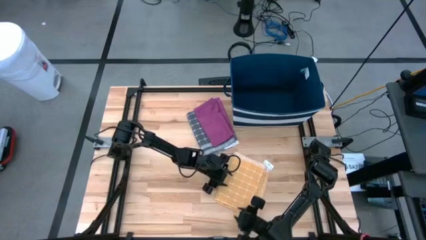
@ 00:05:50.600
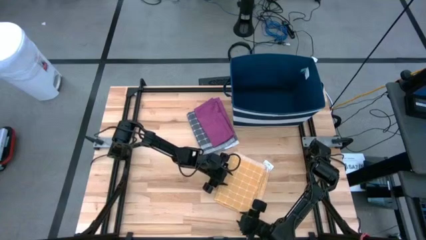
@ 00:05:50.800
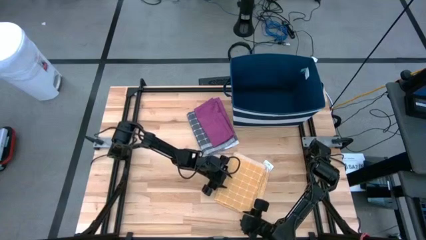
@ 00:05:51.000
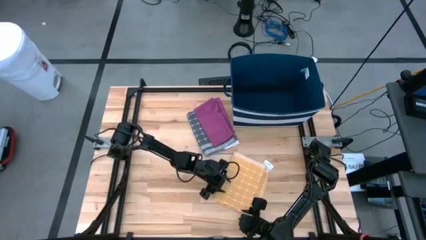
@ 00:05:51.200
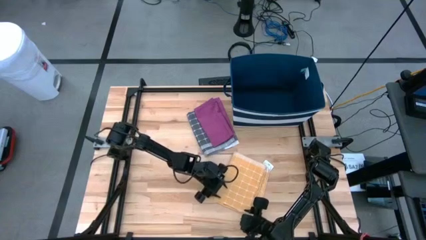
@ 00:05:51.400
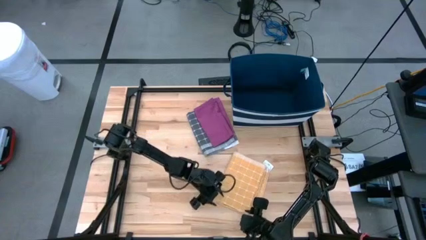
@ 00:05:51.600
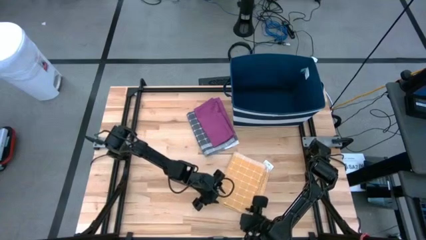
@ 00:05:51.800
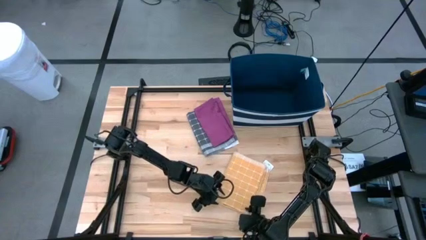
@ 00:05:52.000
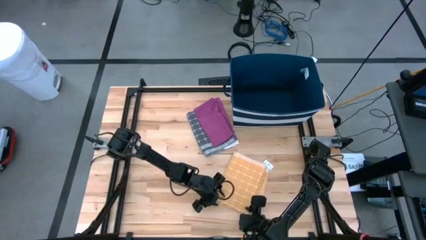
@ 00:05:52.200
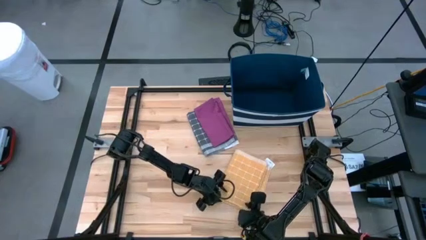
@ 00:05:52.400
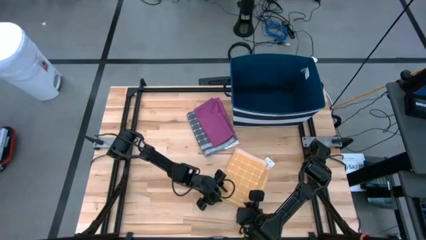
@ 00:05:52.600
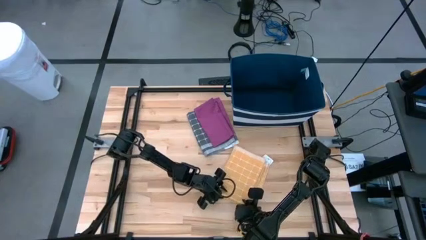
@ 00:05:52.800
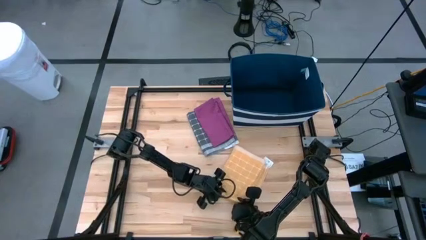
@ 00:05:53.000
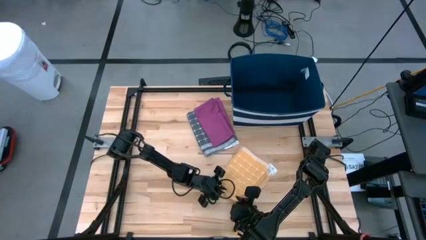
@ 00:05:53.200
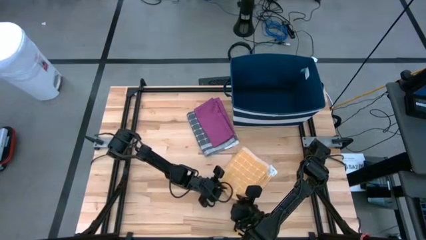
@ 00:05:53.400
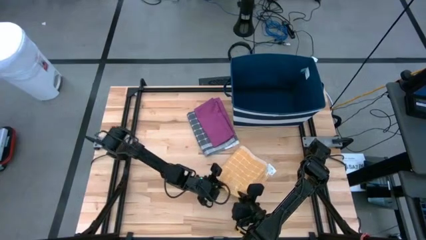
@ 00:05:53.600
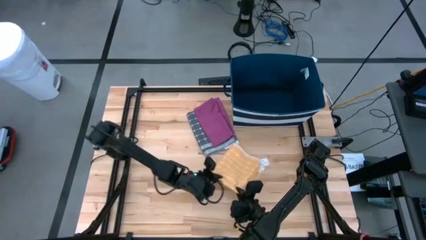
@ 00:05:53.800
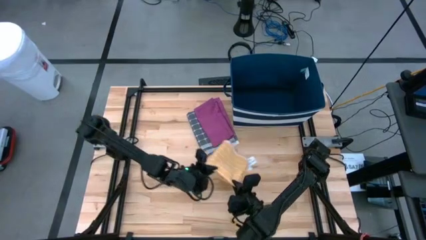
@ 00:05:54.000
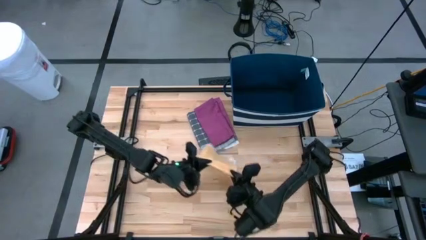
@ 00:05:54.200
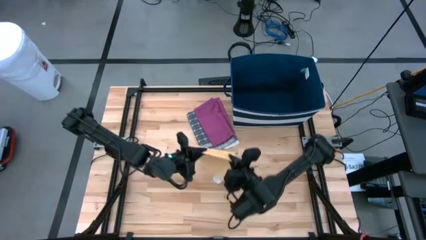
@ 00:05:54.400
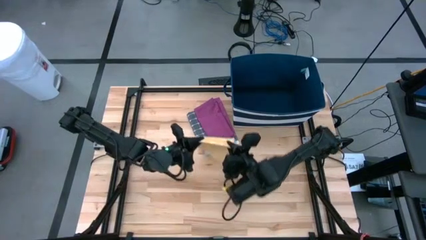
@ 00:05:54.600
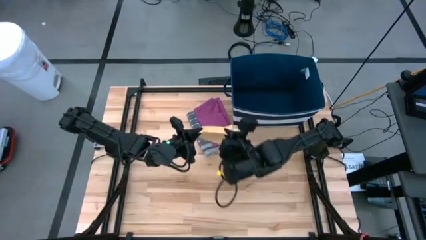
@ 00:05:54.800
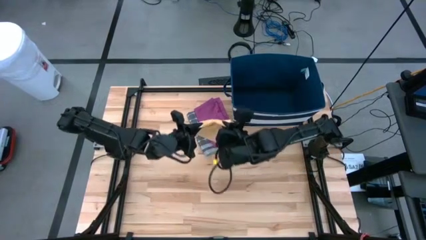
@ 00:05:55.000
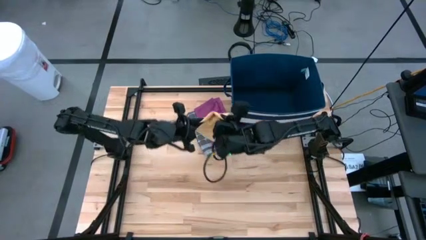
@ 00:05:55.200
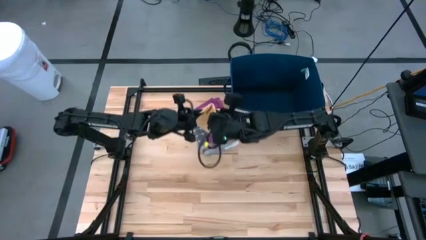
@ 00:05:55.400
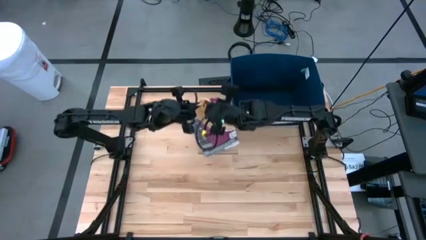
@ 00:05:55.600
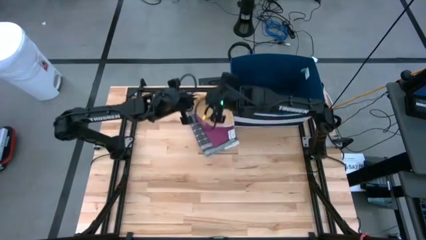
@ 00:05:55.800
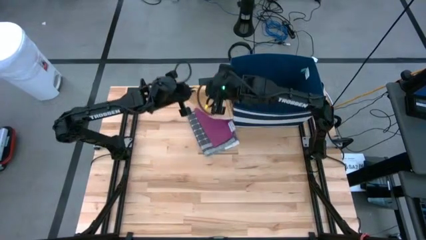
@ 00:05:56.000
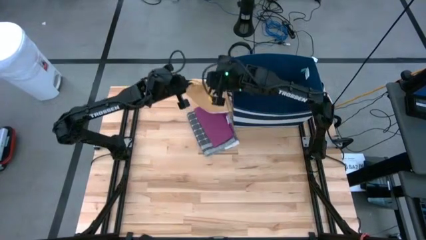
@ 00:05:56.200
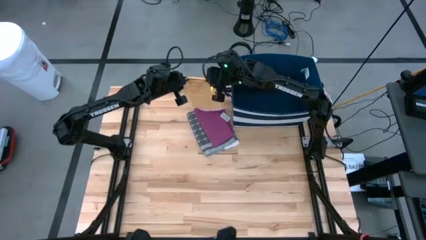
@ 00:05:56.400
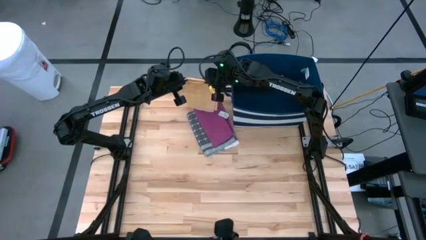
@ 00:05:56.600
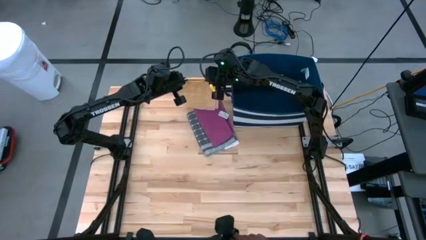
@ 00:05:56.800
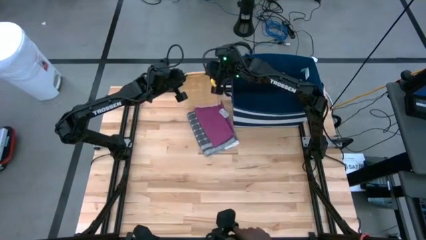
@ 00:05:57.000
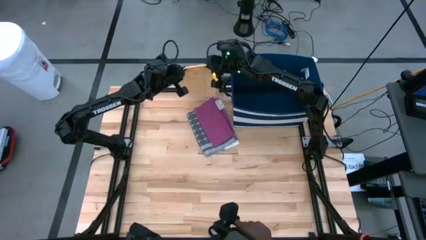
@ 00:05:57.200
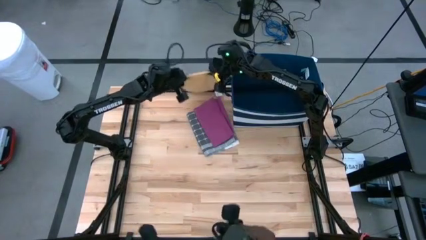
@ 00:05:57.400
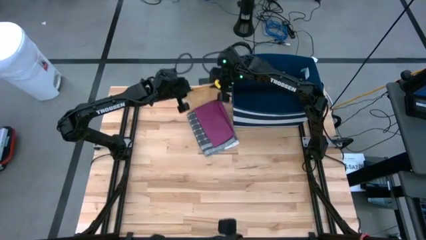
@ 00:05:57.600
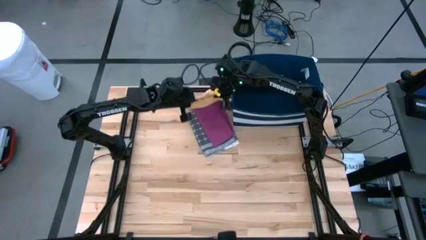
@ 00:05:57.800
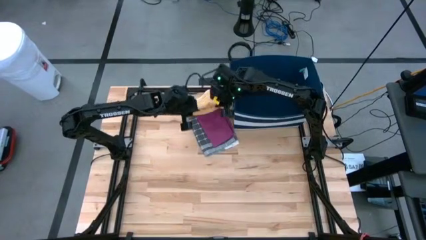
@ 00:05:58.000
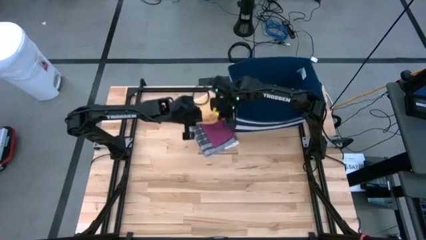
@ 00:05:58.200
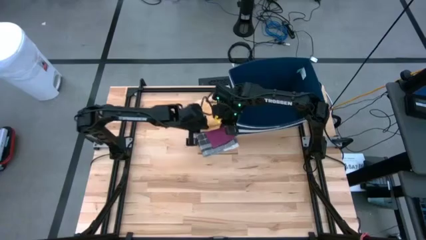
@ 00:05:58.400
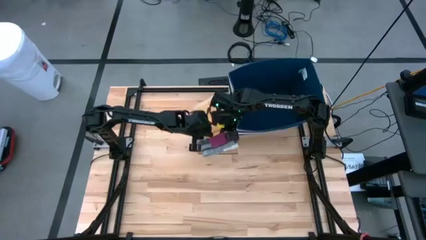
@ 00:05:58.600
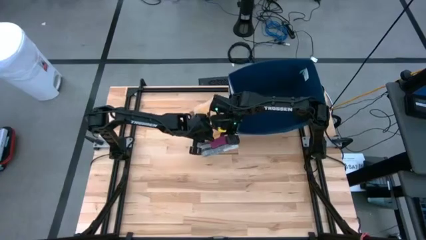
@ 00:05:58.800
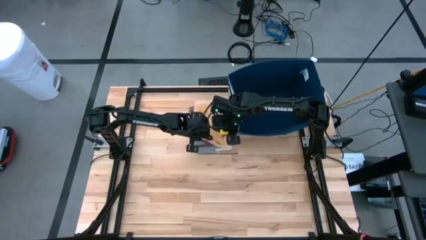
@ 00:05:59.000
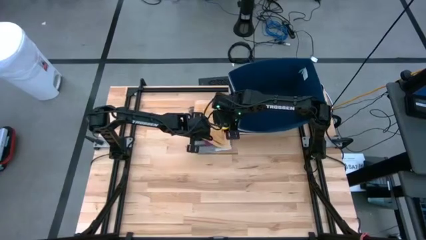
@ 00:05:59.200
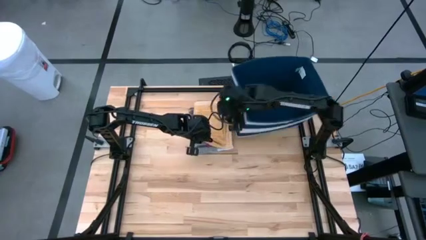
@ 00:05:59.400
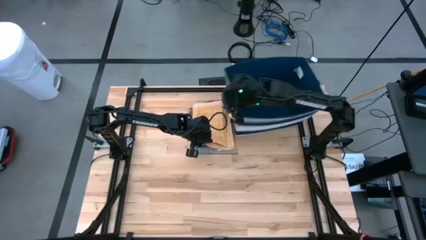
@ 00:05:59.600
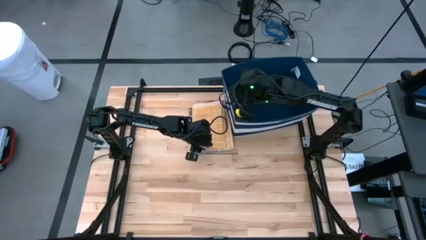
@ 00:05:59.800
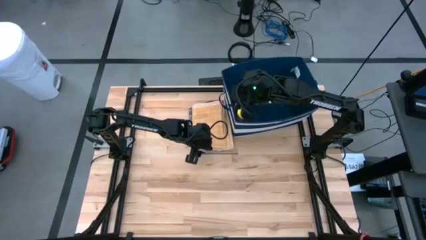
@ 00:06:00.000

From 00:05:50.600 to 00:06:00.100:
Task: Fold towel
Stack the folded orange checkered towel on top of the folded pink towel

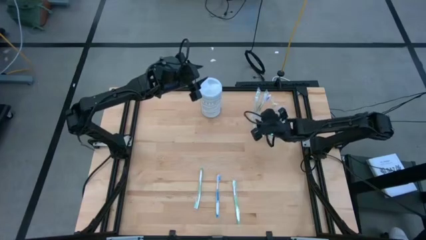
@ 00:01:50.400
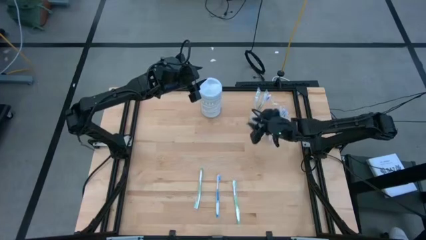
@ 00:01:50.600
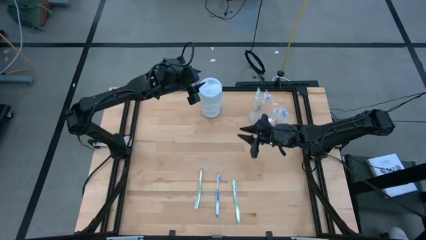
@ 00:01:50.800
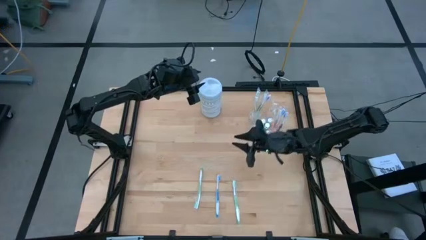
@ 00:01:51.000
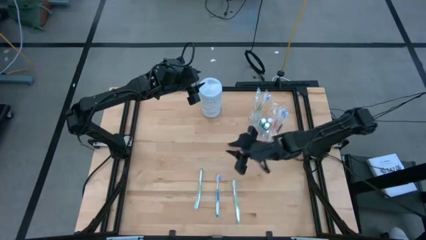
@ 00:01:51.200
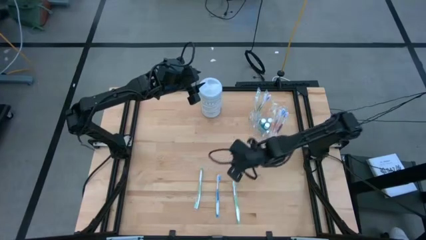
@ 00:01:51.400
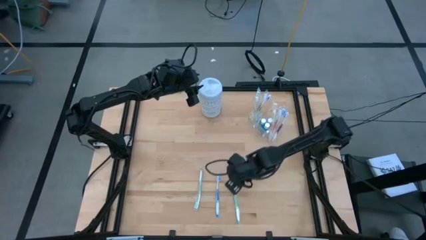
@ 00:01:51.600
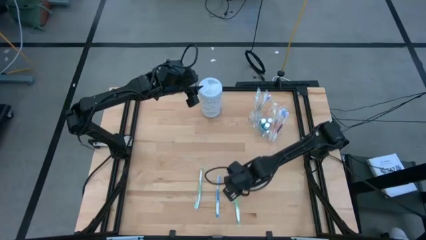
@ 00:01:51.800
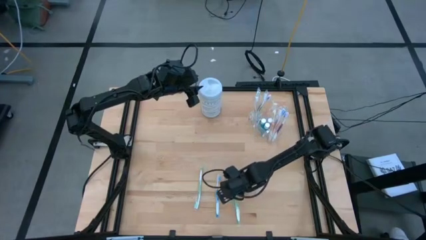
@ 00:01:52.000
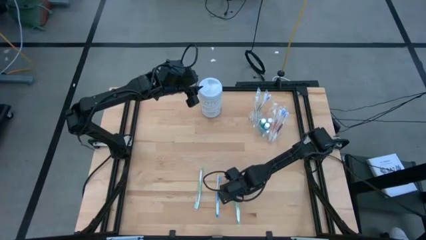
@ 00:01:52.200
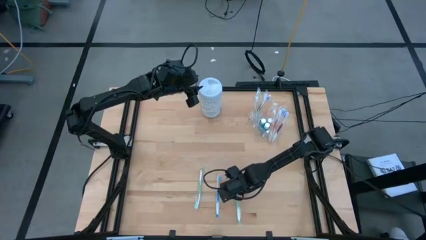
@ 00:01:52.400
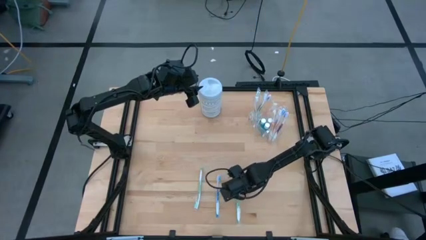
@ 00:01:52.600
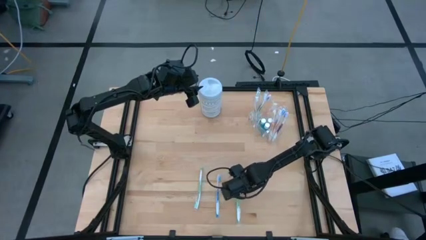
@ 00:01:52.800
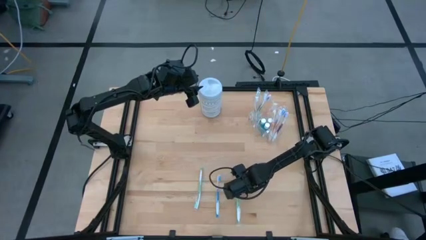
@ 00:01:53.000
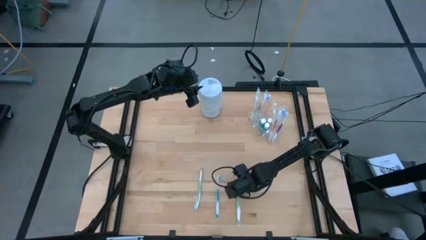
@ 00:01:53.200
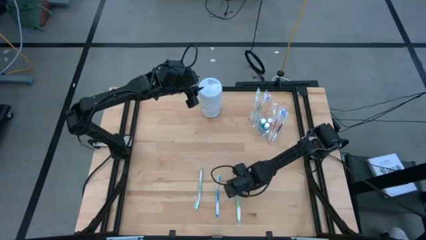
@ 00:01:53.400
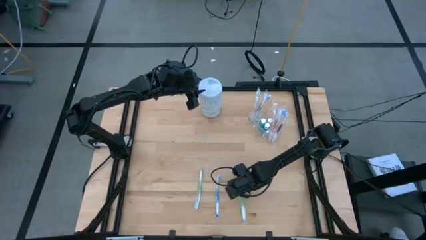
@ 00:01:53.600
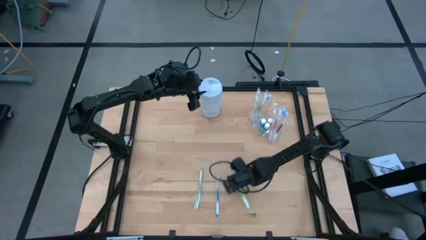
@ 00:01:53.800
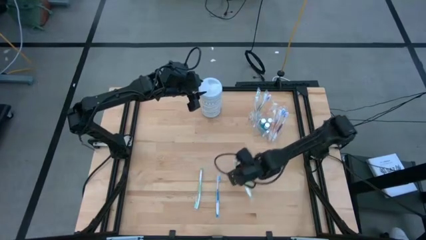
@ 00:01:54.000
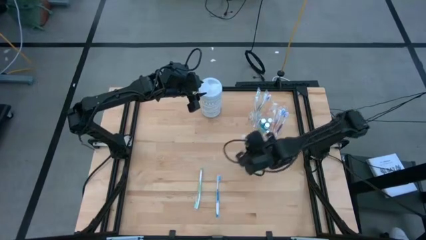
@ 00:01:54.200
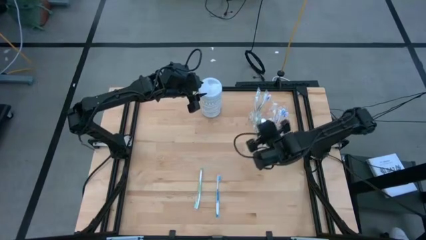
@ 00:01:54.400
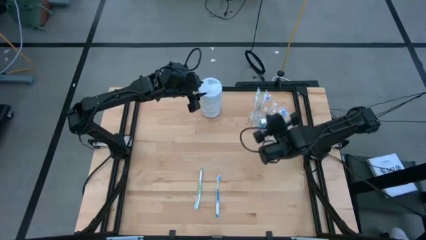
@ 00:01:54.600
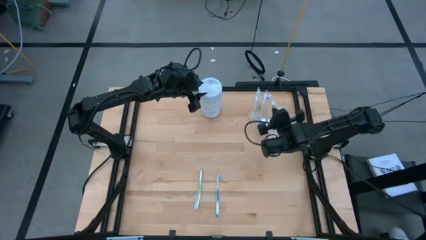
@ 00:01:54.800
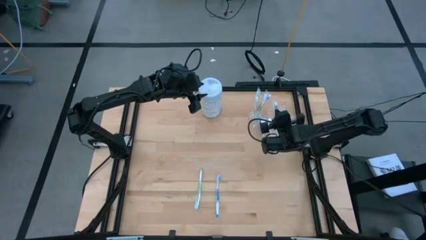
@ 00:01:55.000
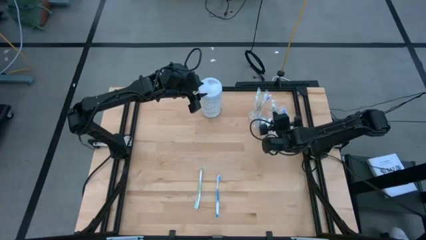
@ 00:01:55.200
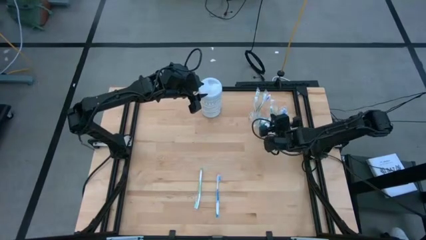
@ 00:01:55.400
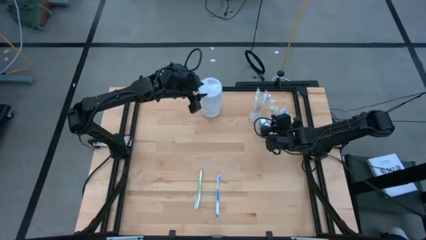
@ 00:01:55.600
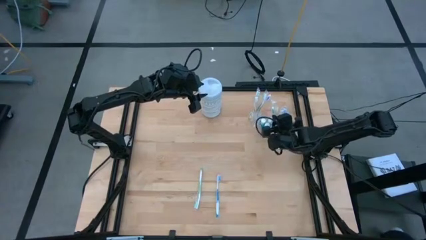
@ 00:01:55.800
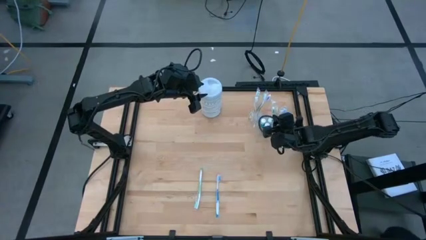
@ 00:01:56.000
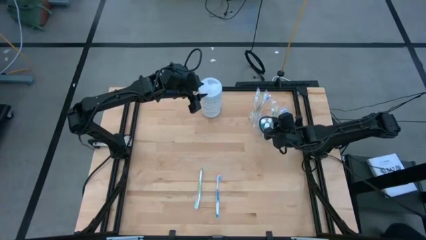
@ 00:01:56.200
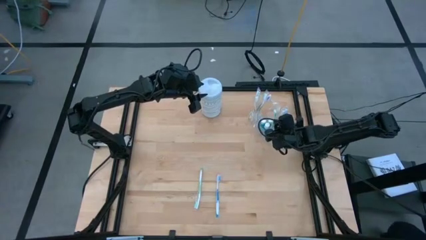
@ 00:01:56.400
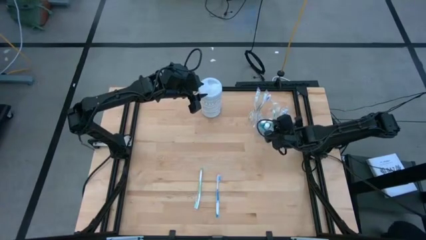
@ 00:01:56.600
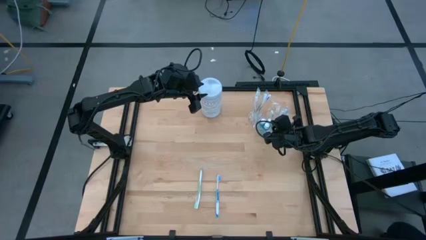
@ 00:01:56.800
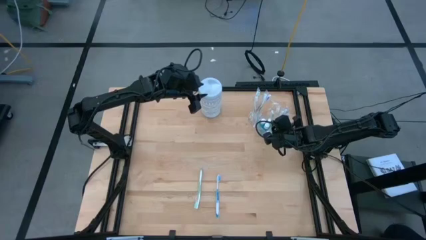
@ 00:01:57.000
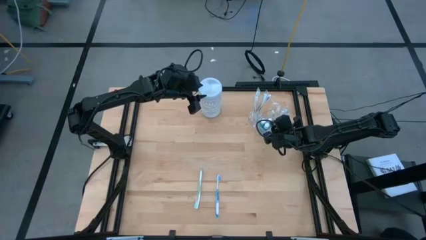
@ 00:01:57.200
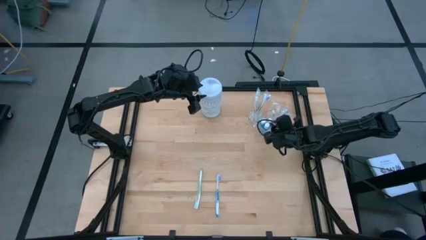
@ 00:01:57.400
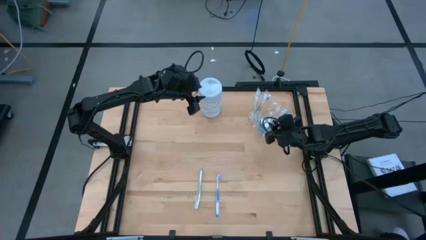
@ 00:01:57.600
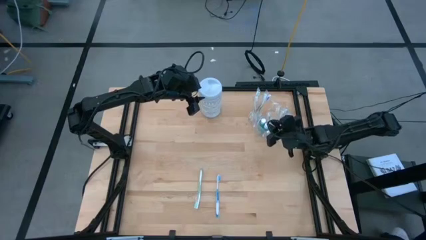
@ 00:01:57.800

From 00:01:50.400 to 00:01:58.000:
Task: Pick & Place toothbrushing station
Put the green toothbrush into the transparent organizer
